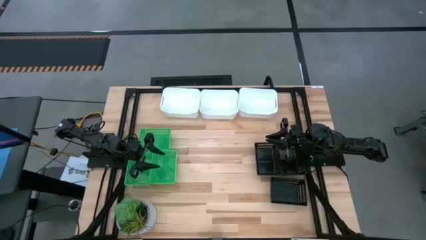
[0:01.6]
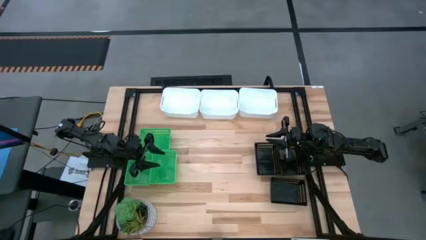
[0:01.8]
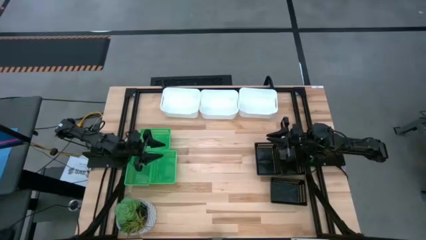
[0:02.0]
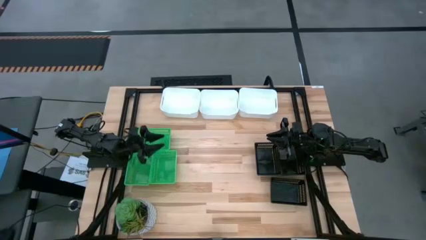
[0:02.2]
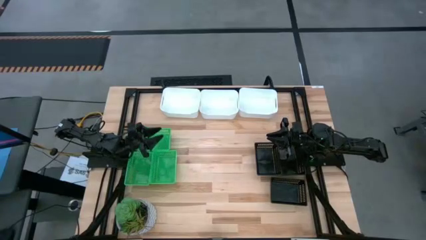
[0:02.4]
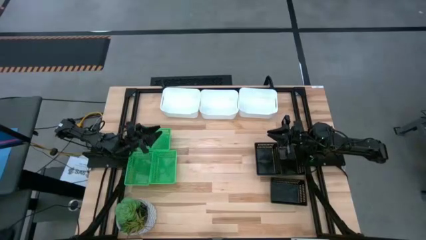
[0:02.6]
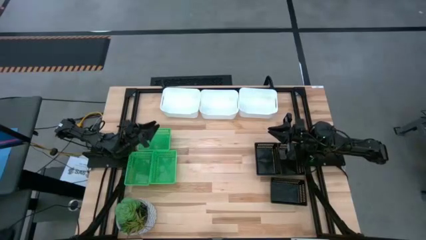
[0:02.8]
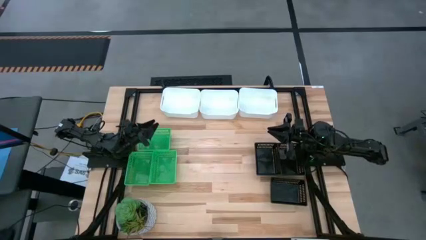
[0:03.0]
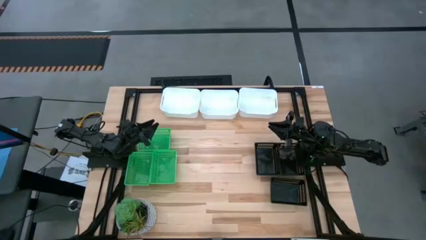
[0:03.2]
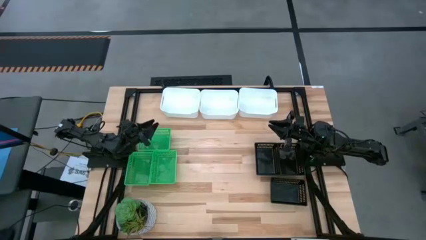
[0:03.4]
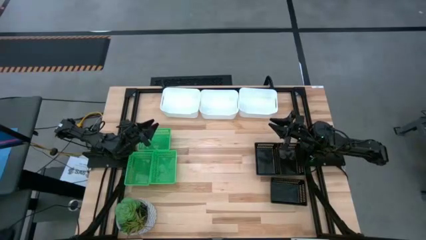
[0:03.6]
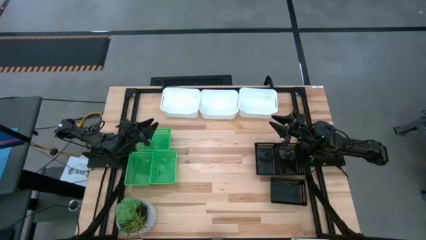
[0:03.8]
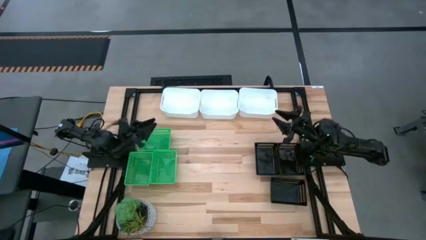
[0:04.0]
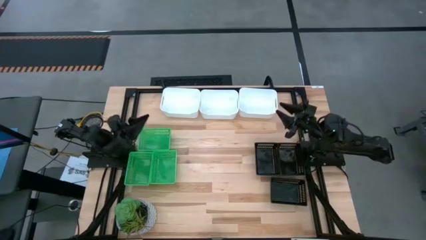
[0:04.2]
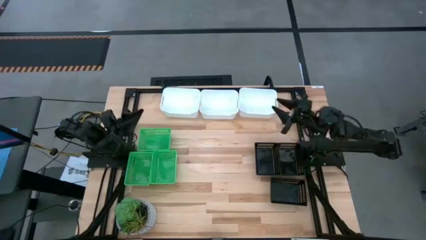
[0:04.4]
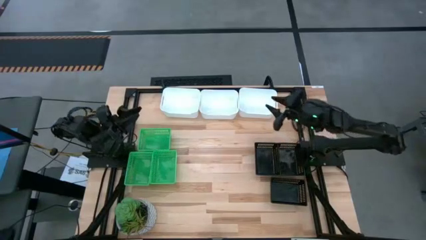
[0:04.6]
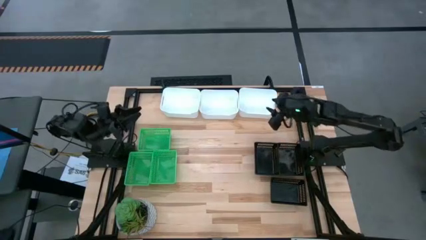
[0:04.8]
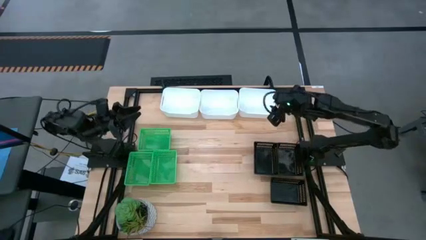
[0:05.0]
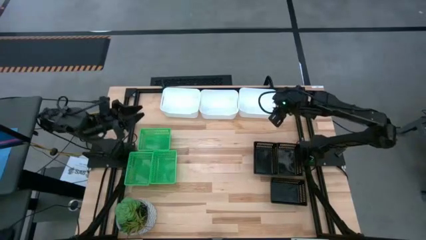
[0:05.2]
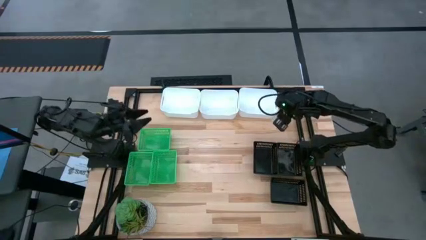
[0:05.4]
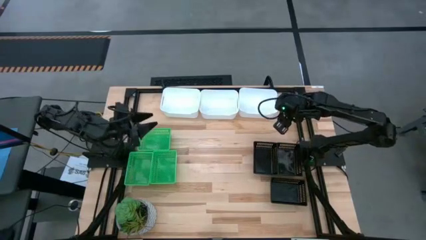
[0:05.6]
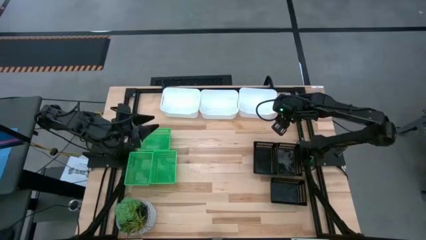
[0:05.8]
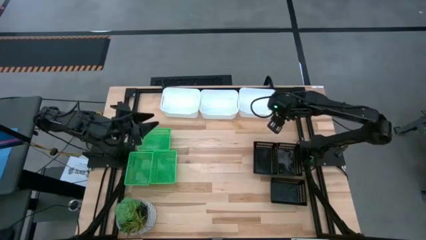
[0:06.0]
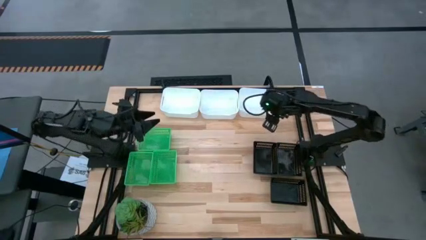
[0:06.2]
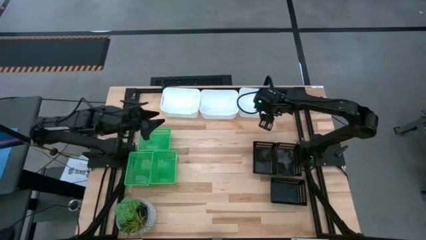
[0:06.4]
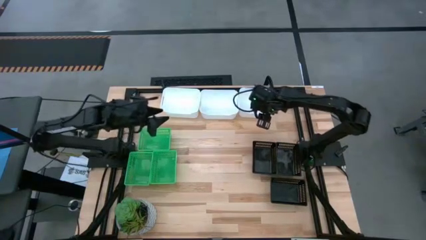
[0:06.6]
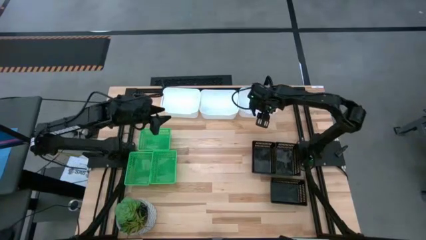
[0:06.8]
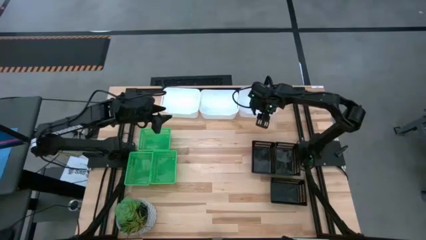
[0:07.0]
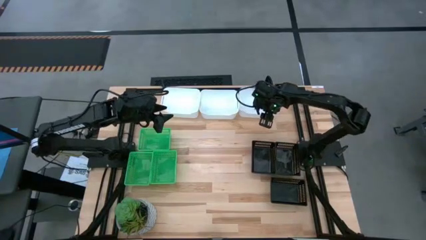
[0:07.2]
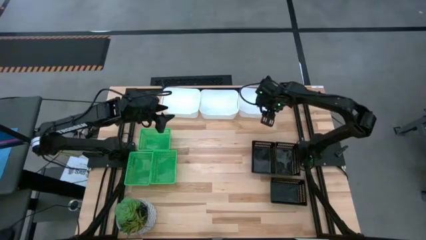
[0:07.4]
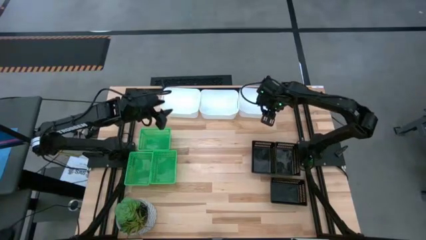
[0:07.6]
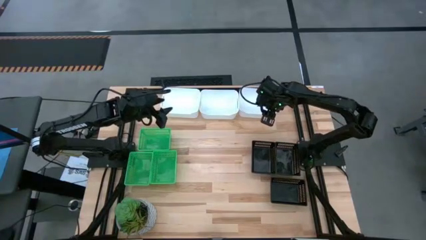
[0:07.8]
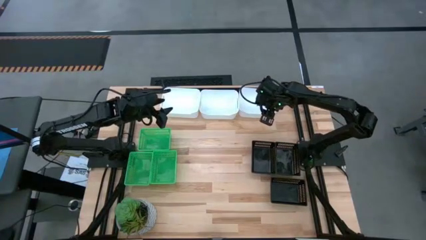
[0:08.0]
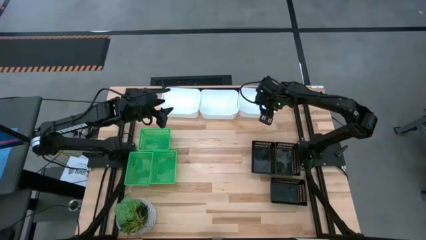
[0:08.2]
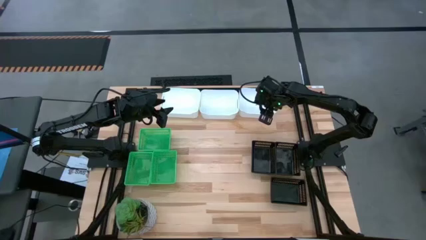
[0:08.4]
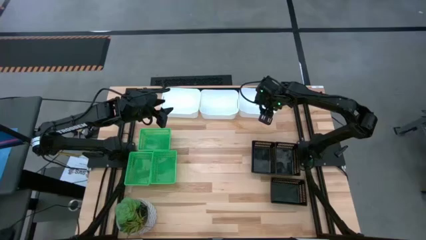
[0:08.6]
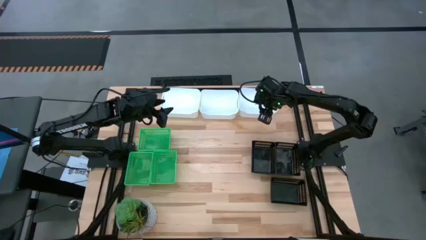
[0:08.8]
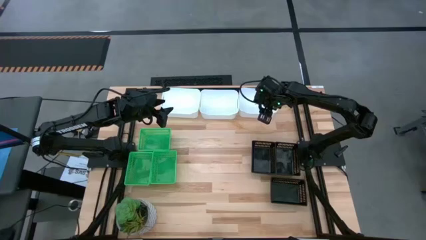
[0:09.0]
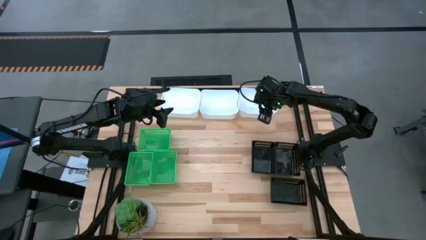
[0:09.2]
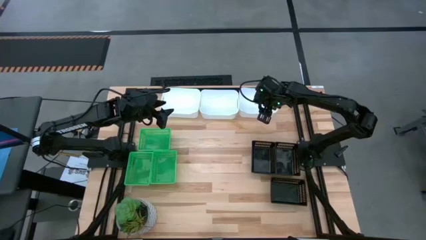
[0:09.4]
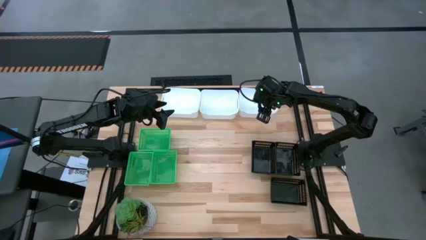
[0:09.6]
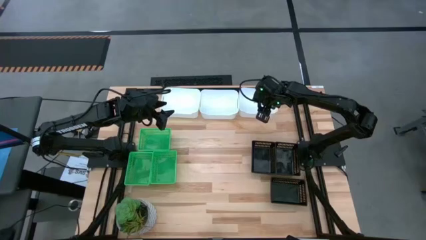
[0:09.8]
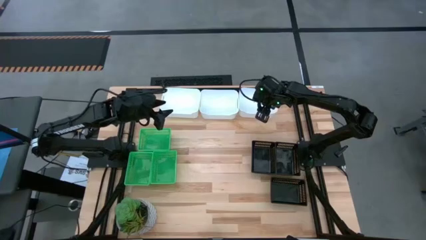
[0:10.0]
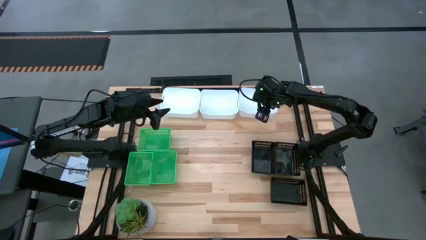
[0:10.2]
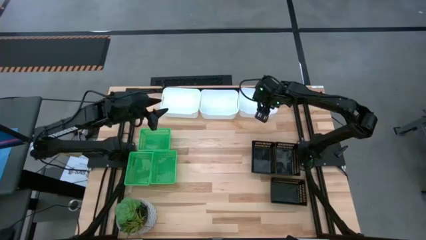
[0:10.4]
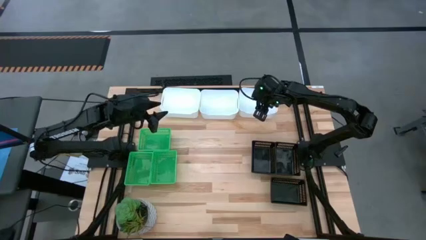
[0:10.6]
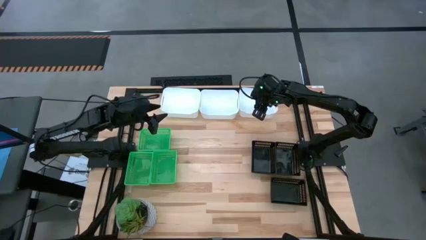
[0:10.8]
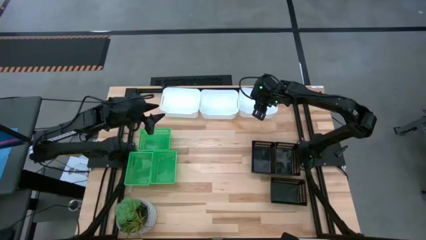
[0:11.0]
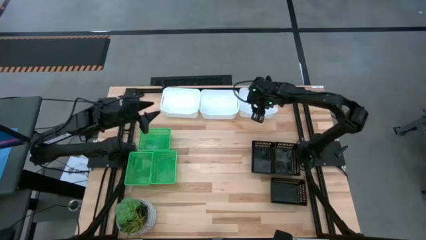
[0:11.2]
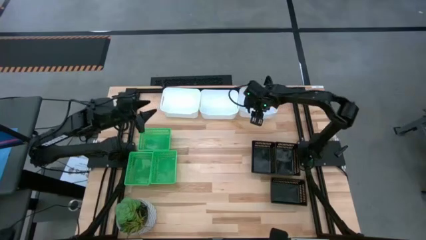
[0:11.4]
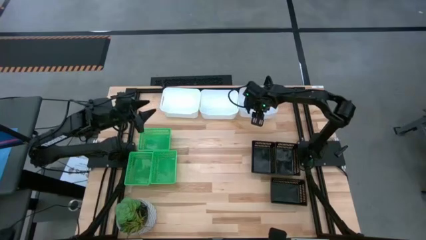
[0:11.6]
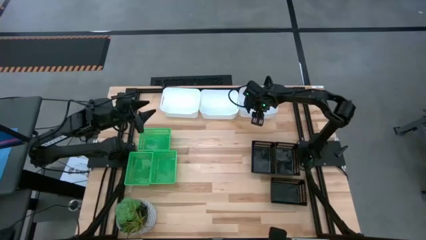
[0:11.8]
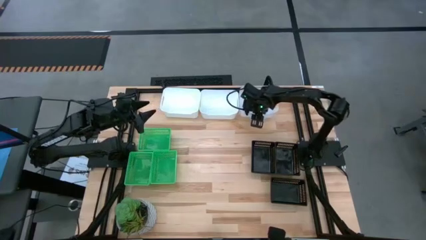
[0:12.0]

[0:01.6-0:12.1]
Stack the right white bin into the middle white bin
